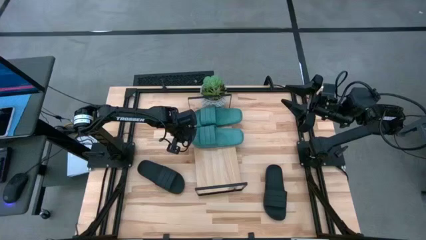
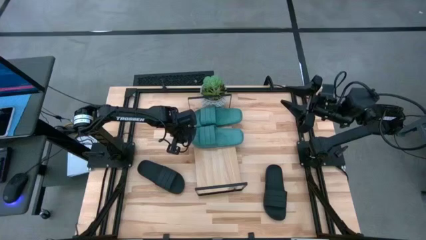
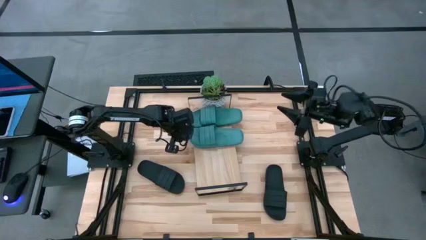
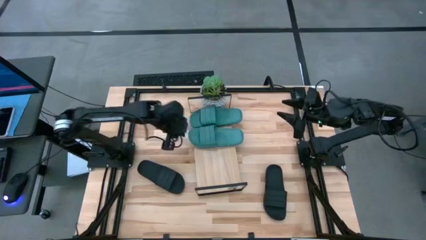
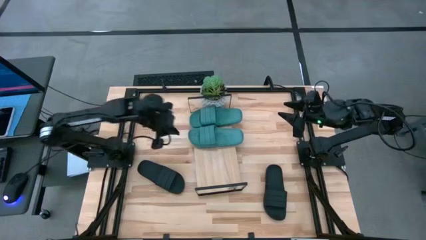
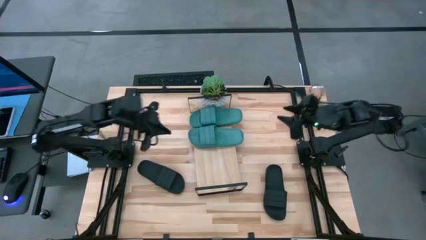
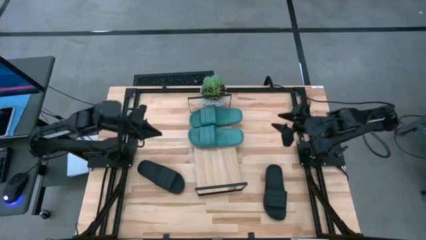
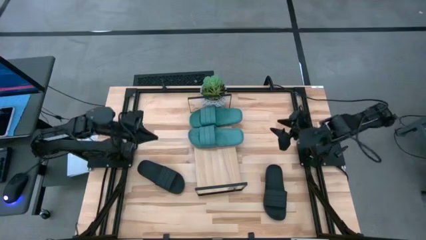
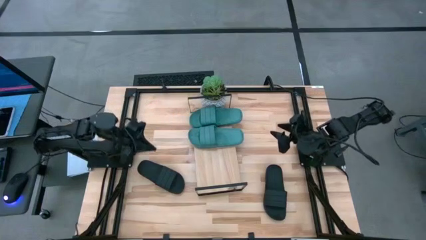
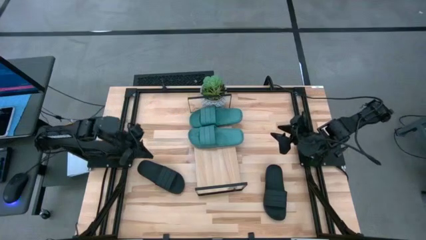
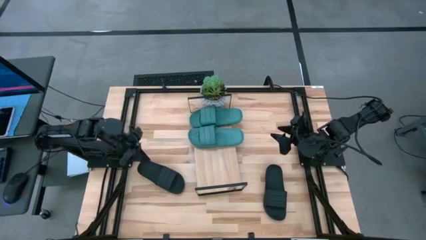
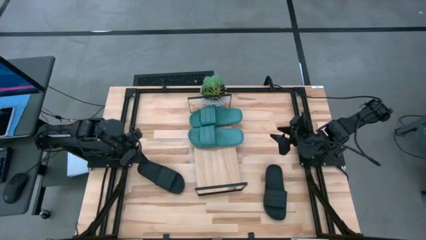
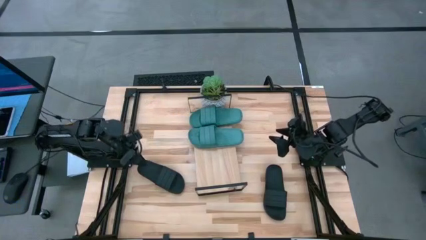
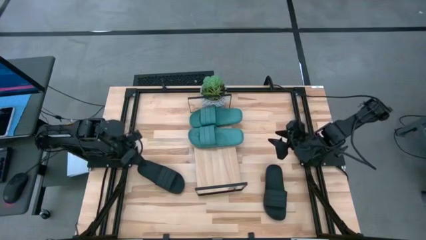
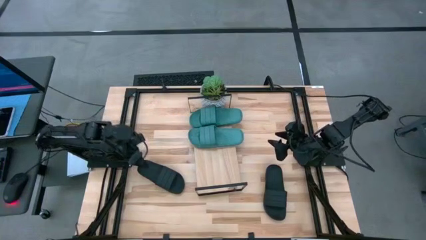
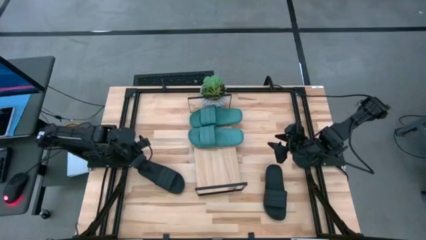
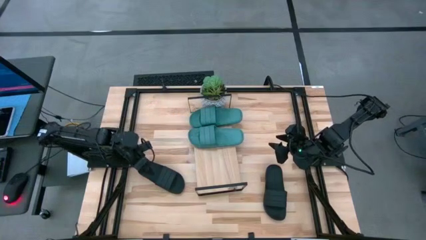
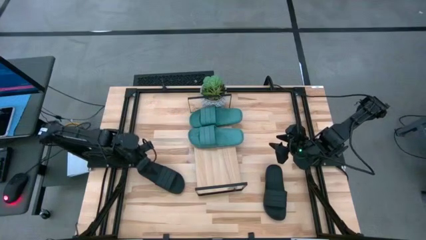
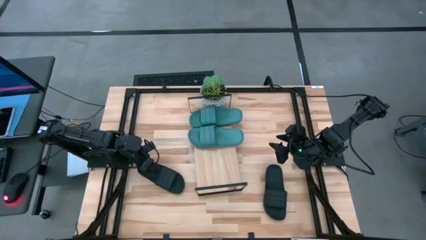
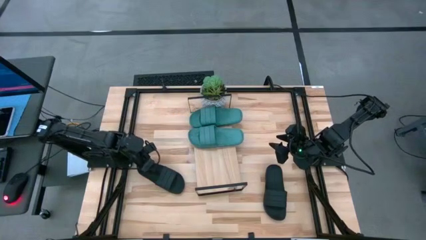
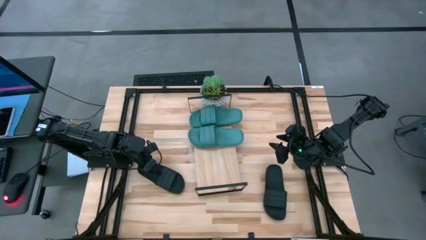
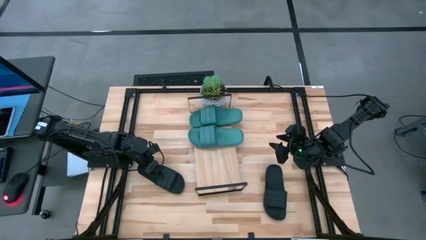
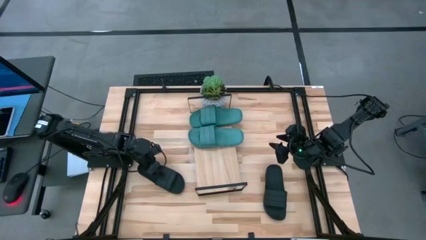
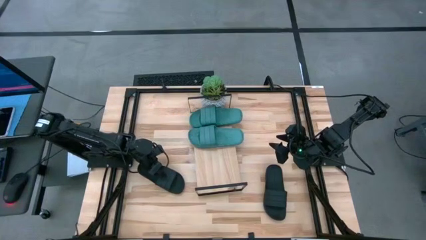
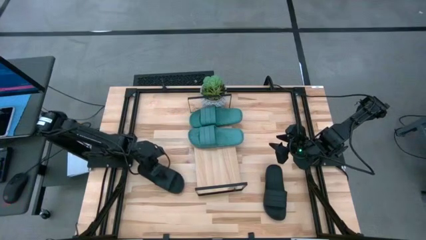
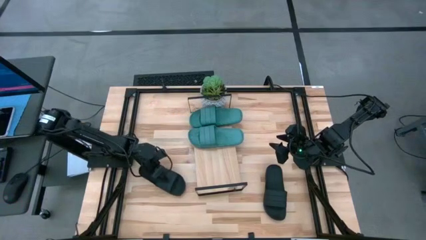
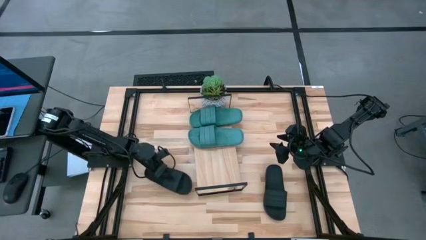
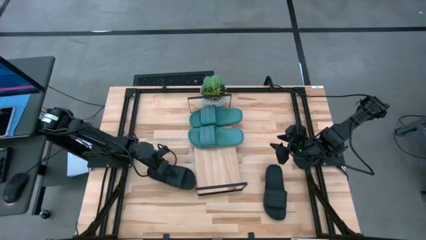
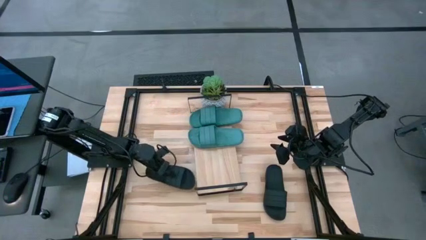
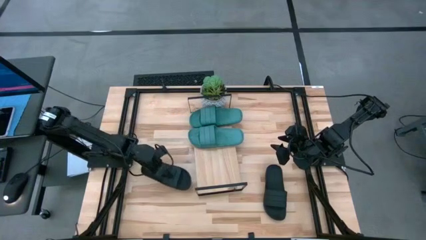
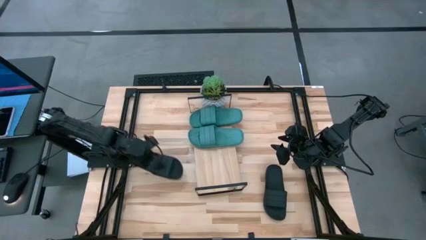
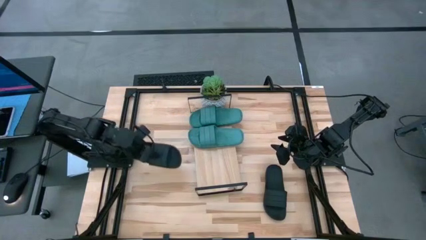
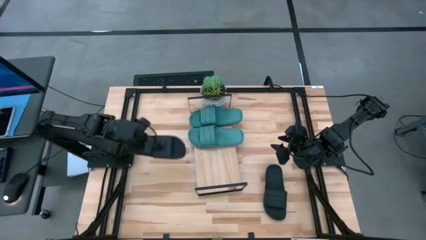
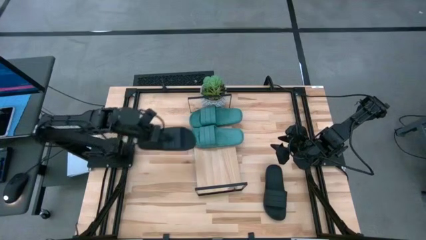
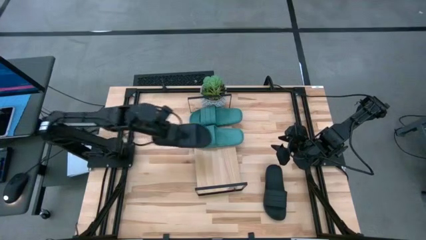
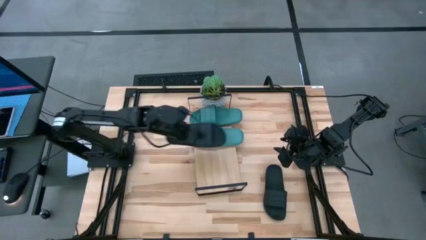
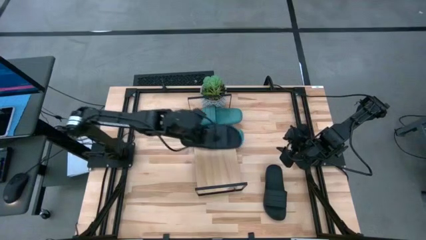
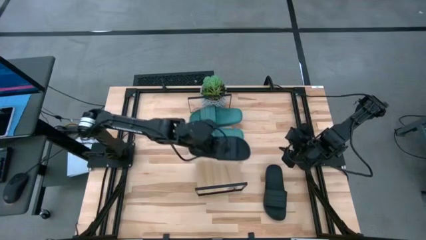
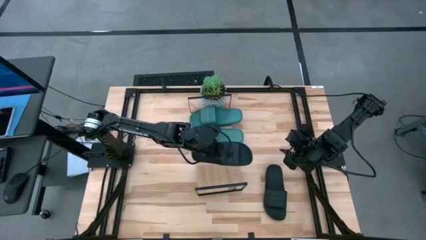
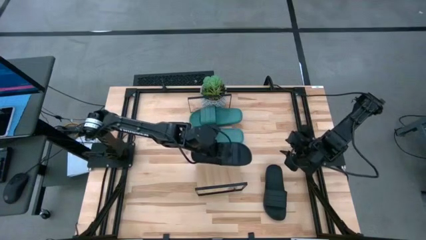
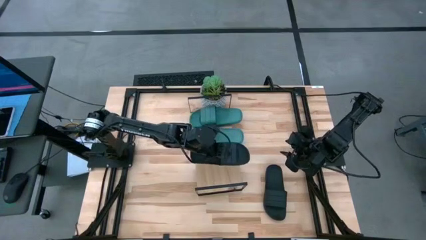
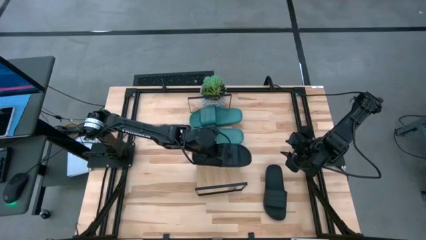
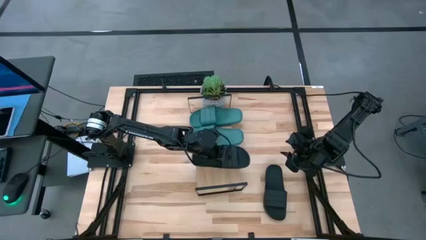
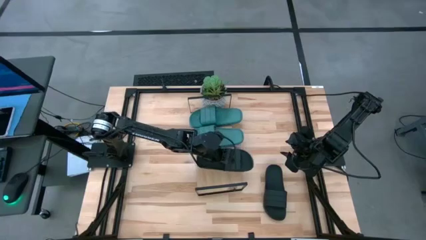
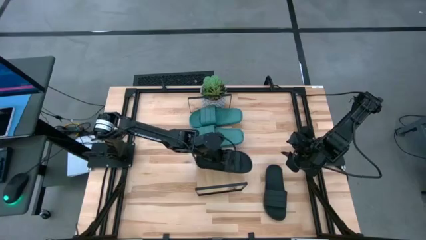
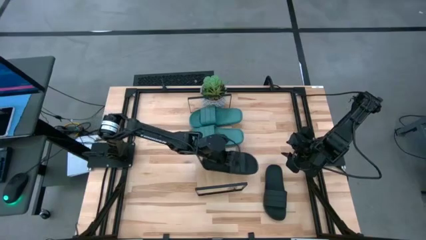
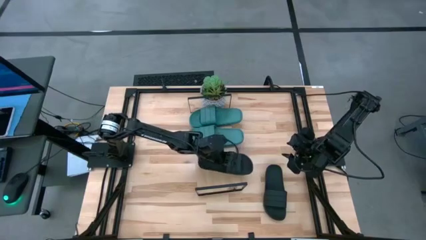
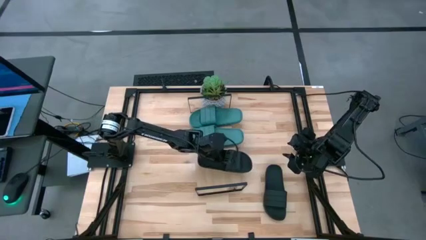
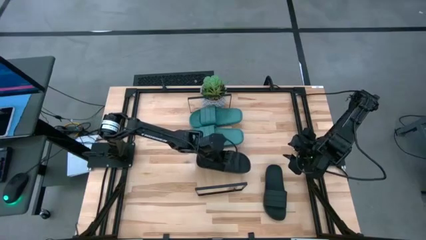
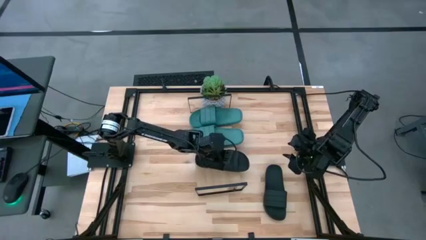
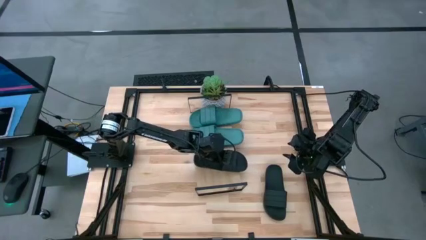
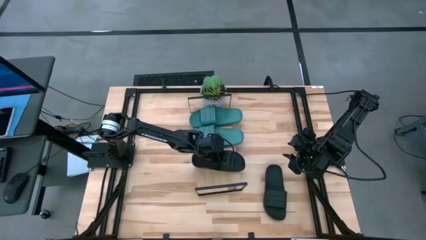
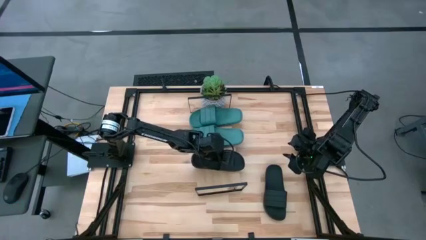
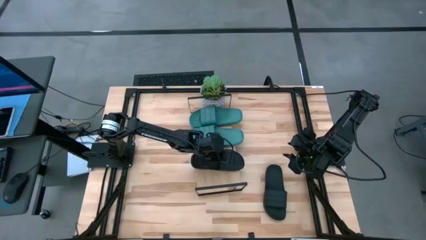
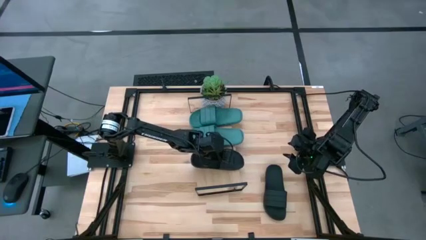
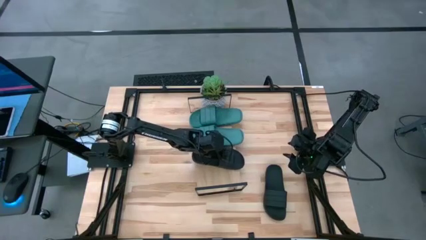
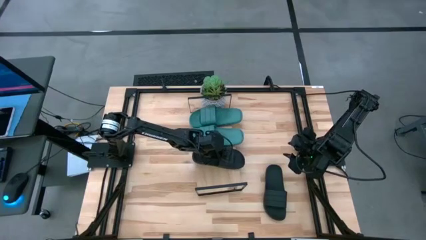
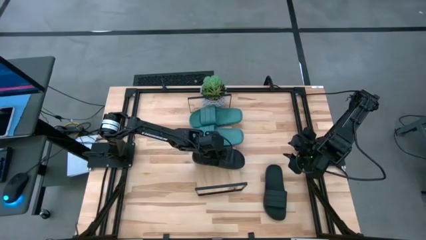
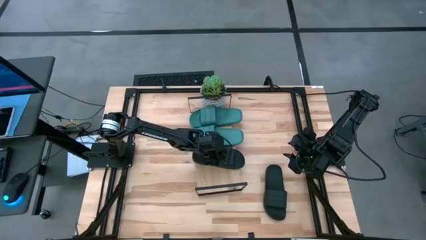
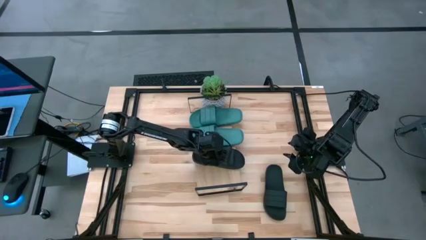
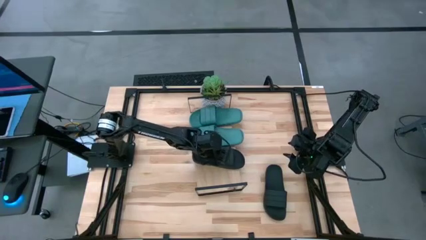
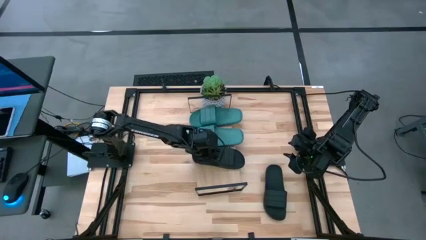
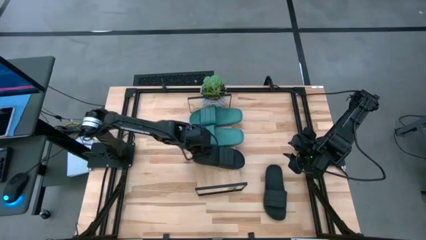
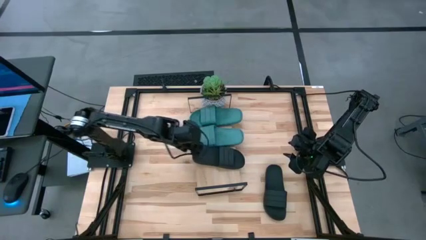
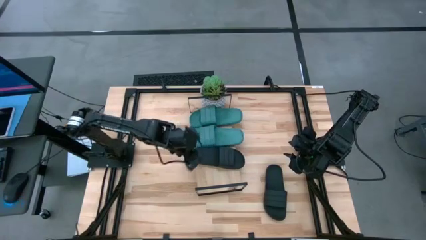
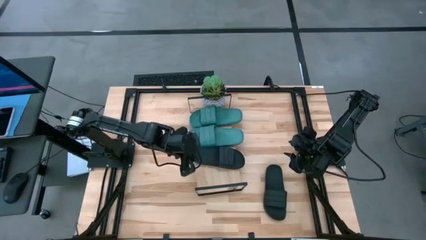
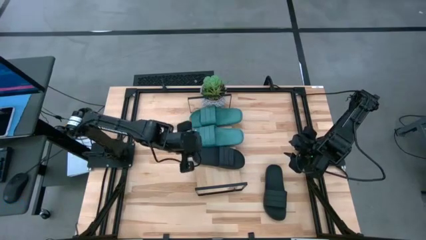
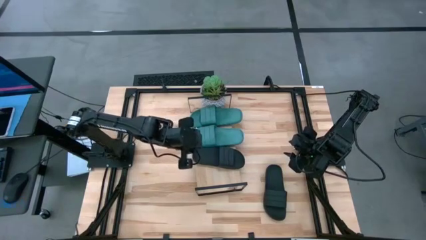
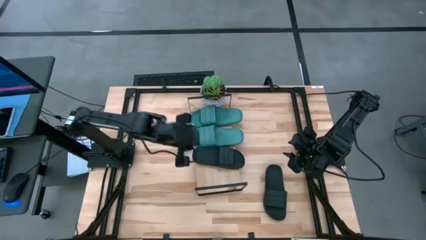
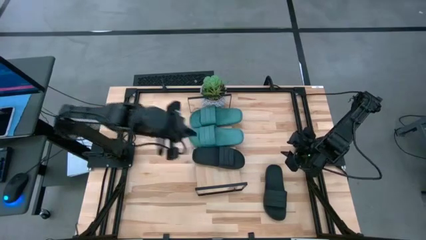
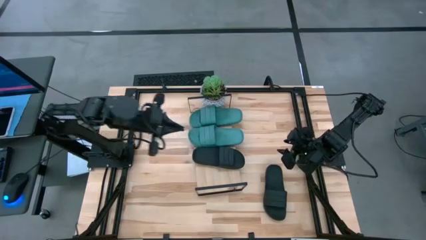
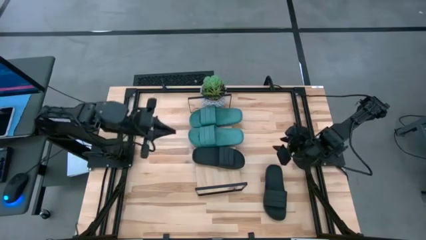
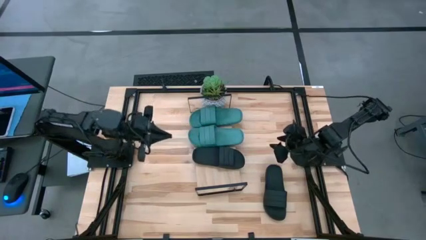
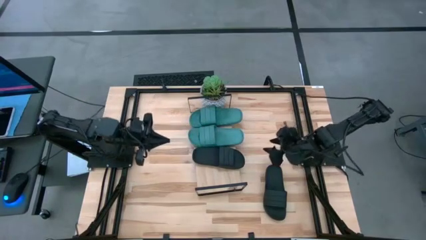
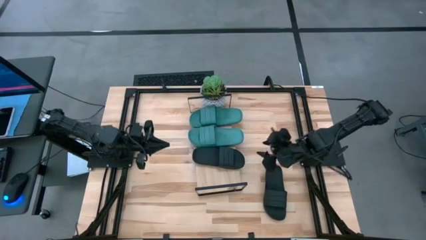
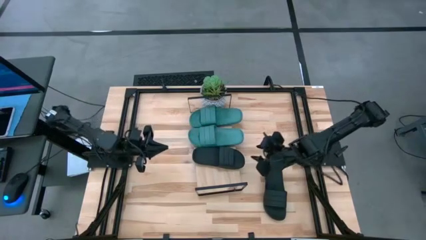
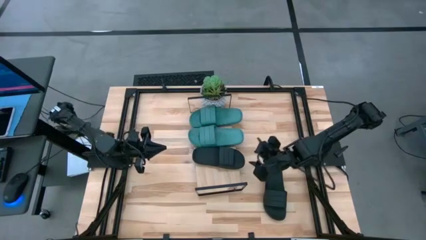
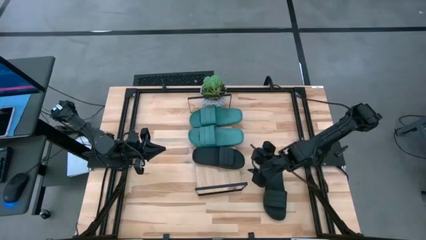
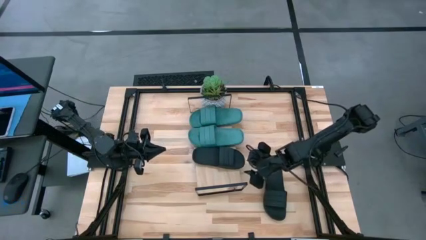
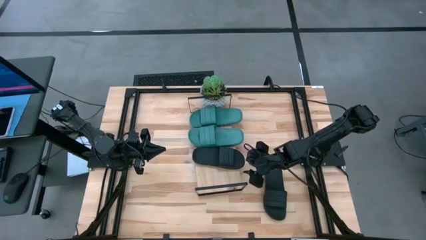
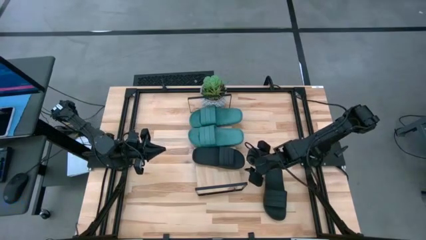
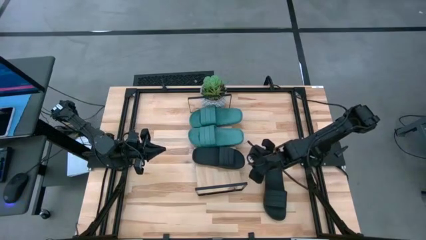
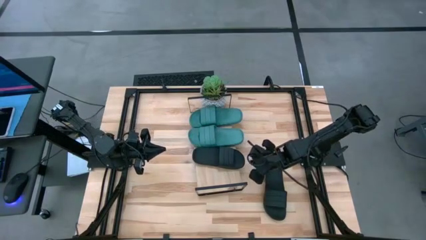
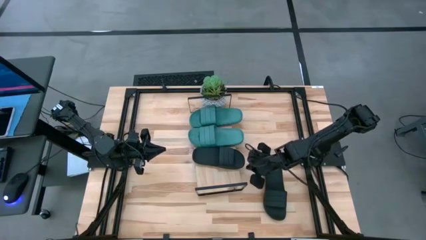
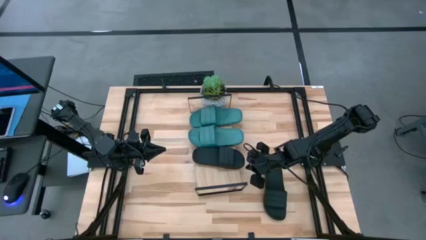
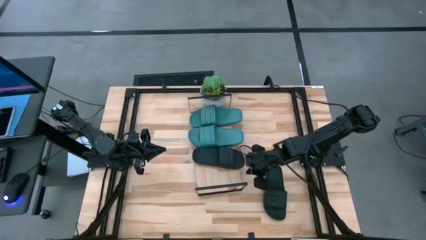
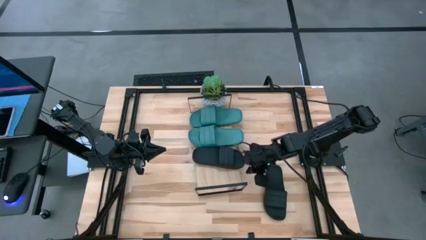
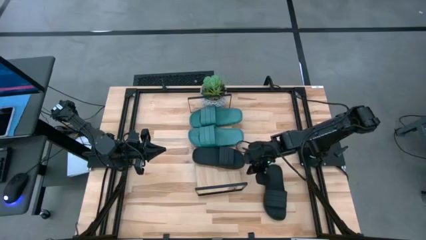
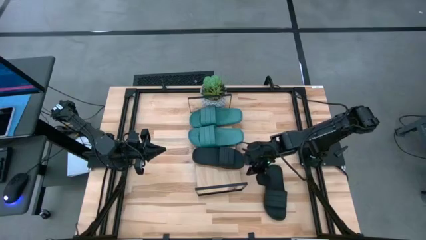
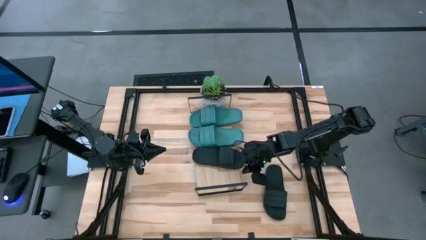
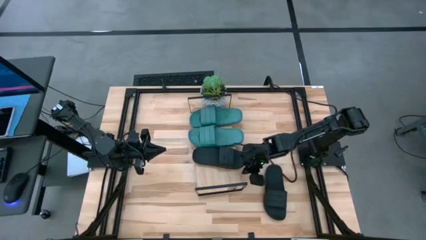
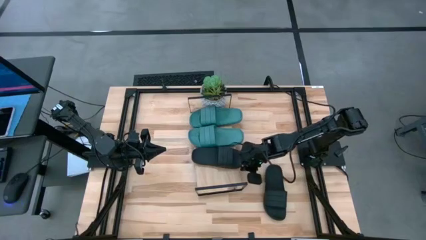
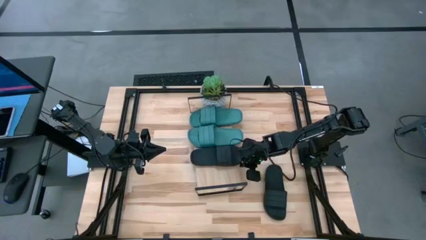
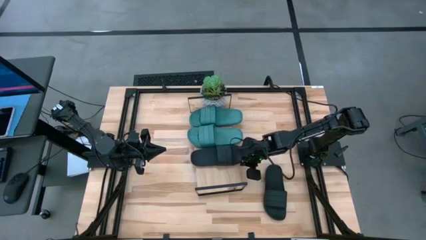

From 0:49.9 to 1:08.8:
Task: Pick and place slides into the shelf
Put the left black slides on the shelf
